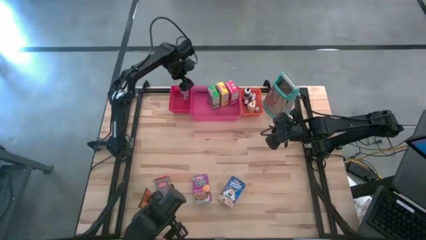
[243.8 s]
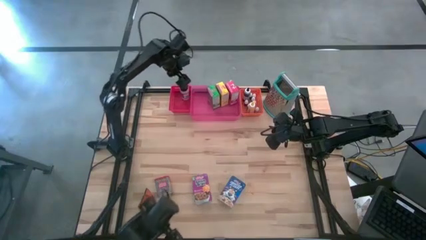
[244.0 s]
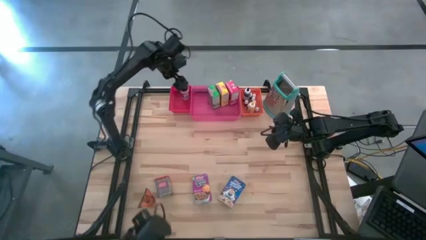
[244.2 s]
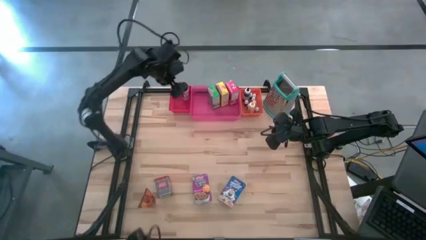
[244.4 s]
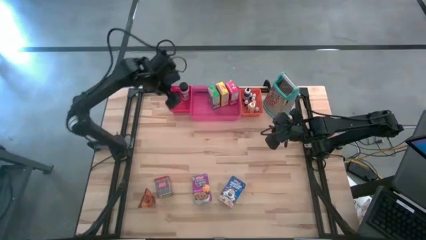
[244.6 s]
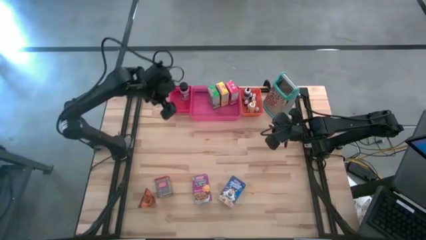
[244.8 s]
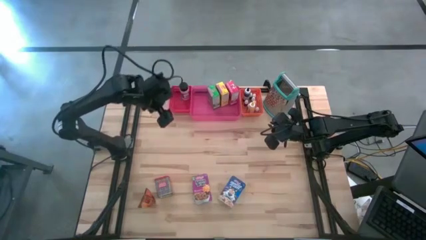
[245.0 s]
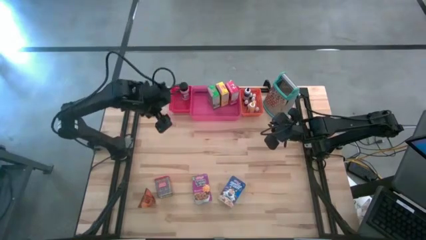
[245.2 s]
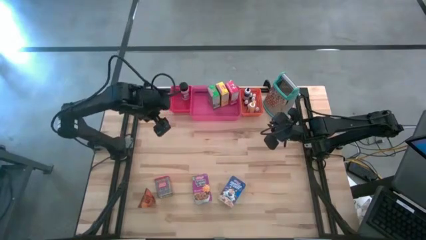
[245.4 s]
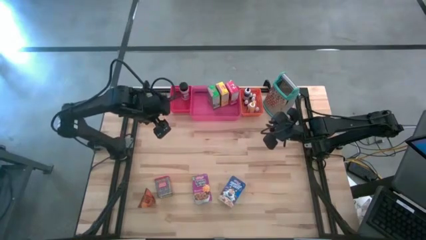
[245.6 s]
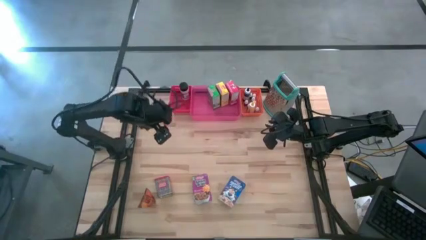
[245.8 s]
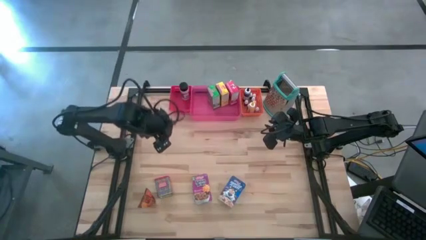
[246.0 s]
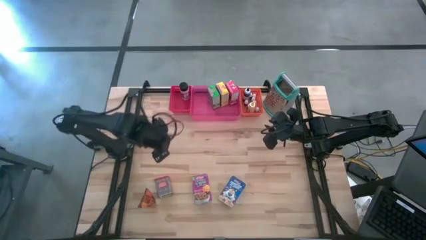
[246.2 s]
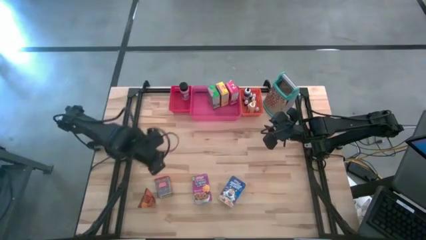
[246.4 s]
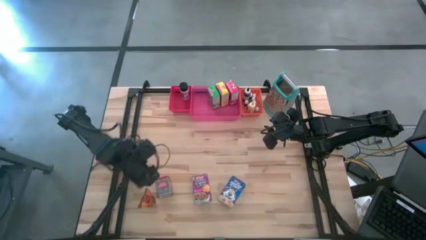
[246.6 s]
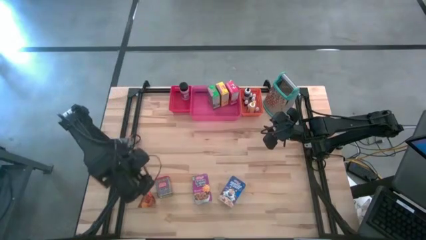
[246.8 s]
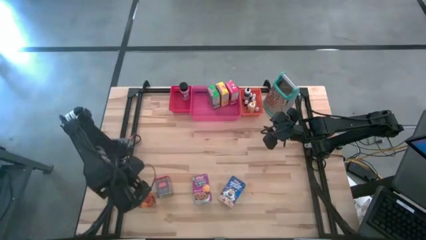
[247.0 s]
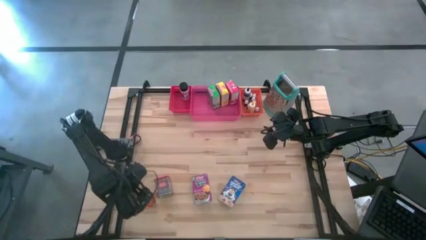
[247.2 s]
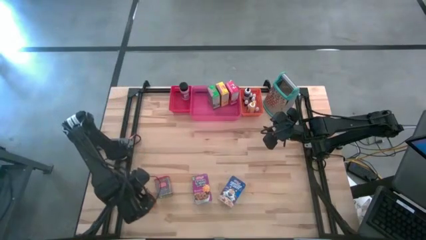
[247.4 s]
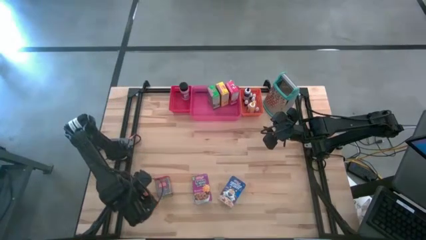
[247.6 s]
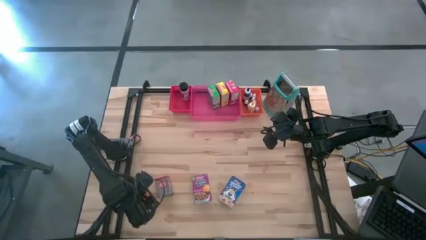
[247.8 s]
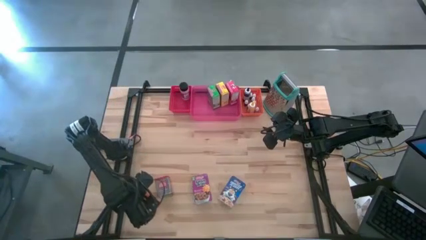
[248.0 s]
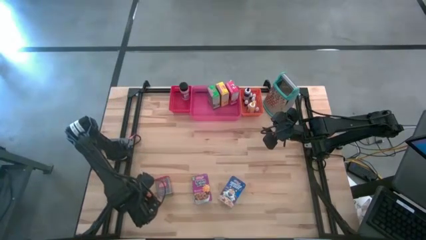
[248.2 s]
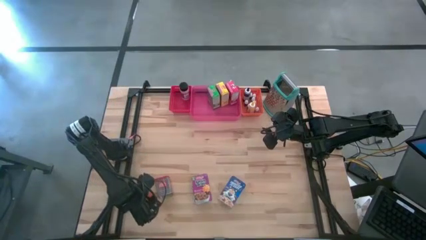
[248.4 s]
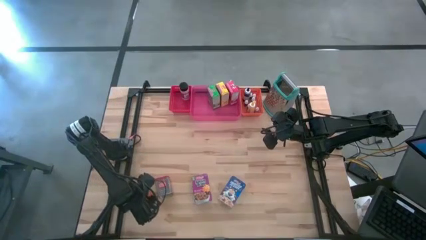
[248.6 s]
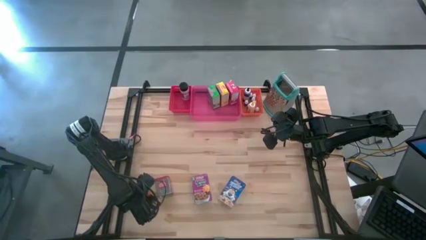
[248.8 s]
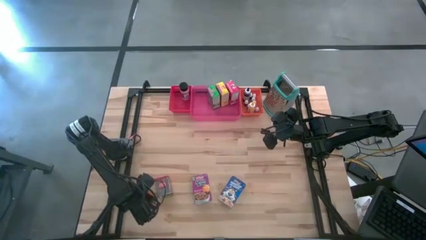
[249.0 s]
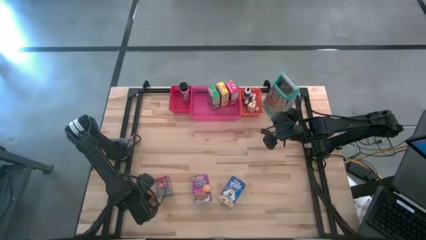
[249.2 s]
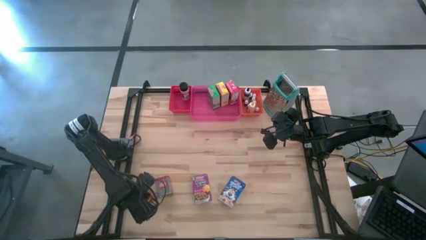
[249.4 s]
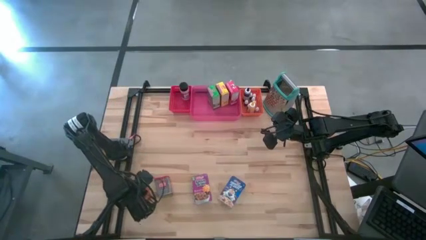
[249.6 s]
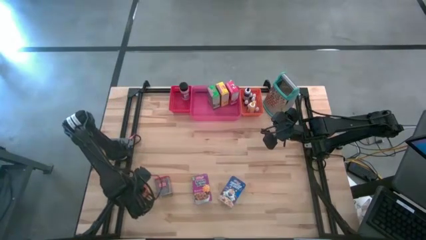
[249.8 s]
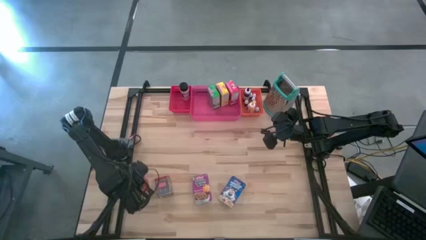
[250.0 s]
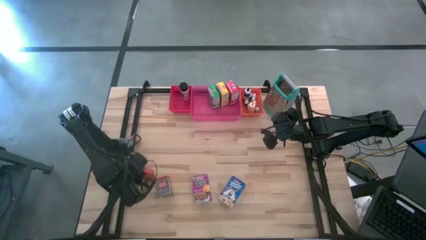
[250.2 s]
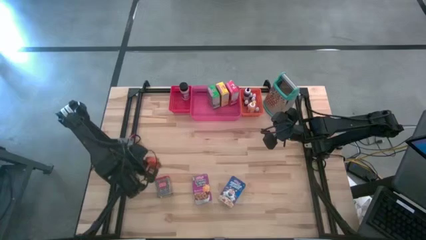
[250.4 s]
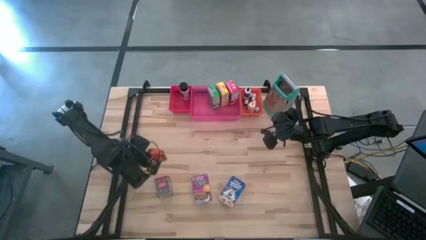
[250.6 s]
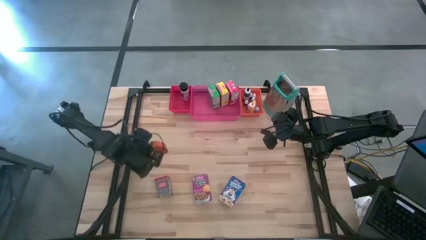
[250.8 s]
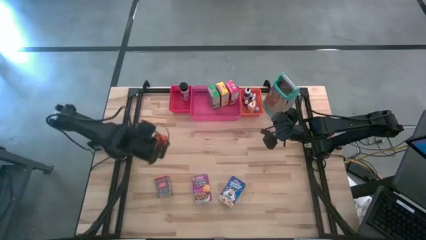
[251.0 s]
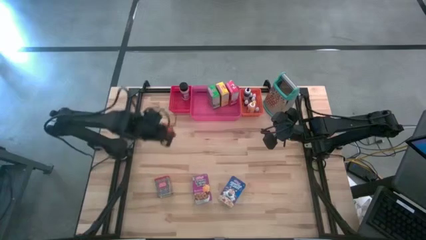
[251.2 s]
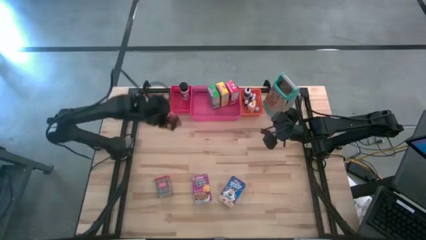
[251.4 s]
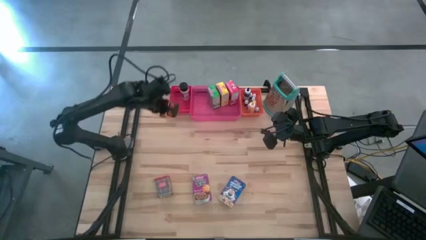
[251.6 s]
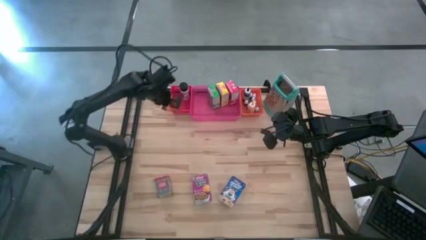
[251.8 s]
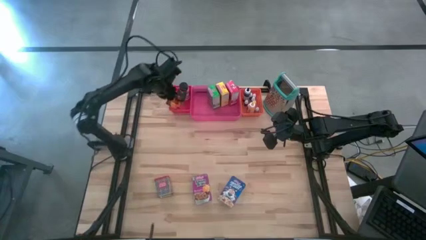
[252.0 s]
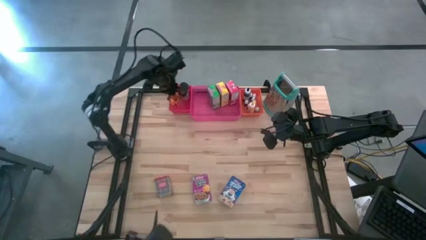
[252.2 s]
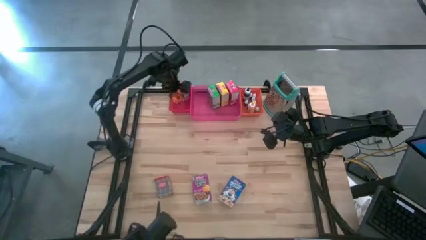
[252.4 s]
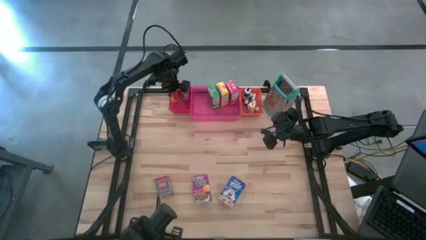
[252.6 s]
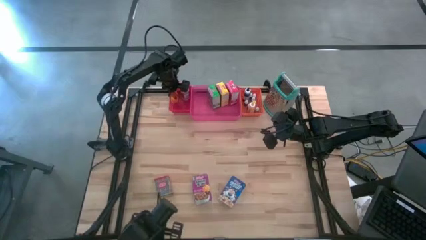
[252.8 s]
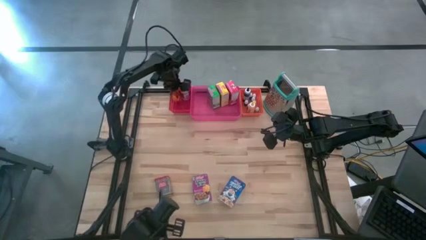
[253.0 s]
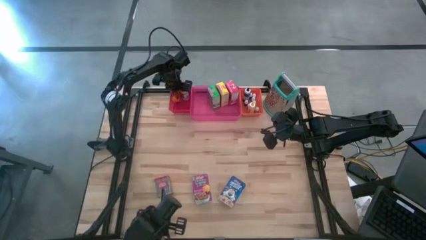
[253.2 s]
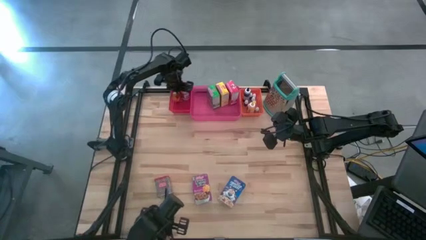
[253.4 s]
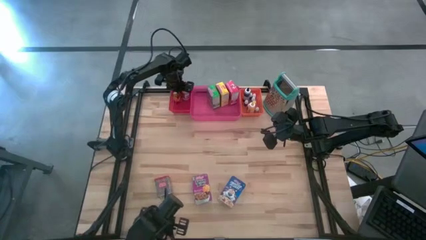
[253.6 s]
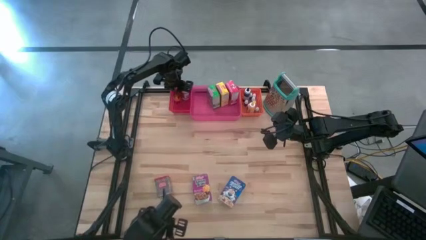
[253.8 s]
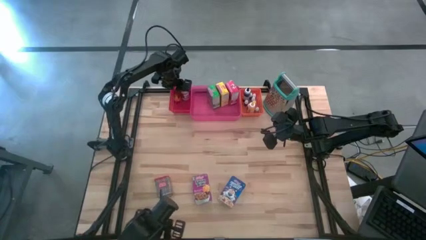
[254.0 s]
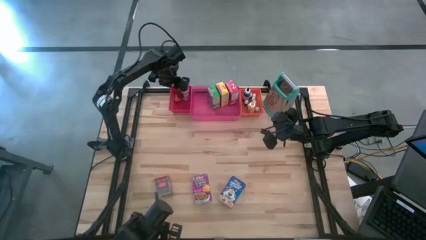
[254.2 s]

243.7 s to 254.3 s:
Task: Pick & Place Kitchen Items
Put the orange seasoning pack into red bin

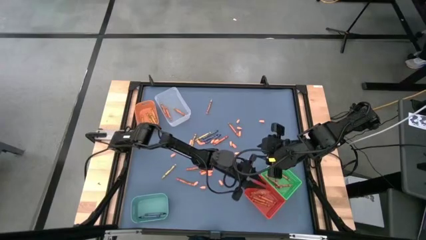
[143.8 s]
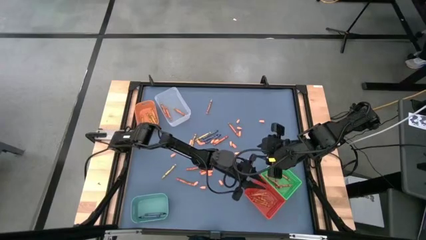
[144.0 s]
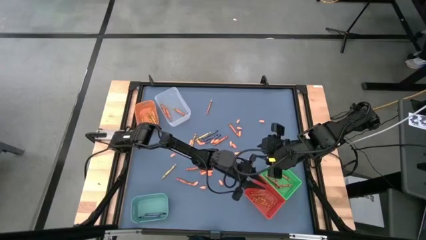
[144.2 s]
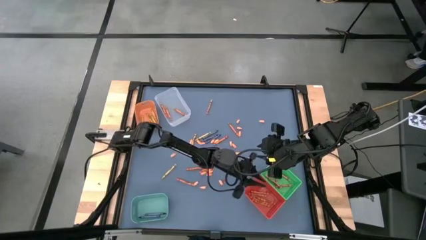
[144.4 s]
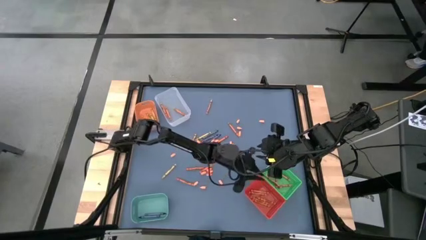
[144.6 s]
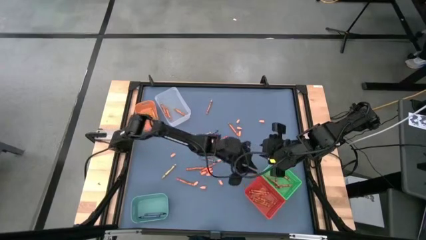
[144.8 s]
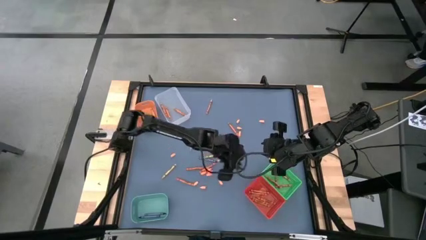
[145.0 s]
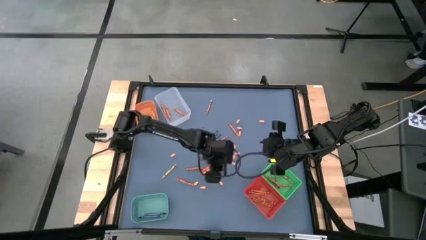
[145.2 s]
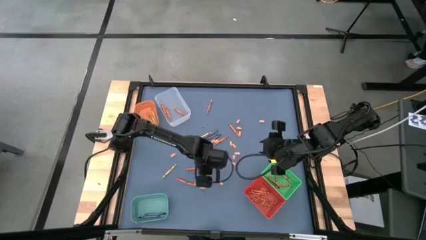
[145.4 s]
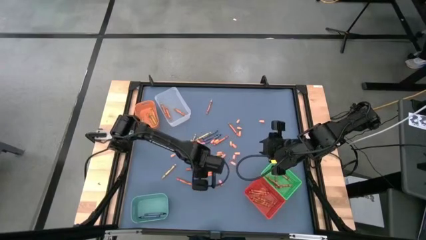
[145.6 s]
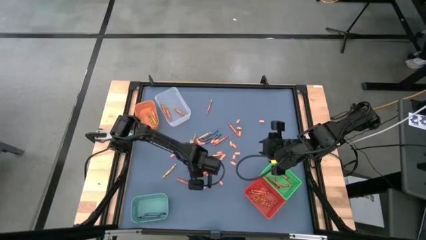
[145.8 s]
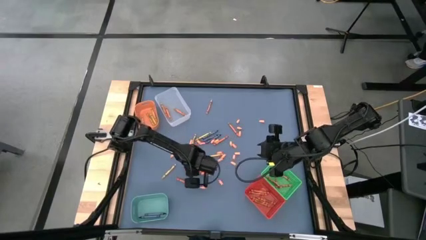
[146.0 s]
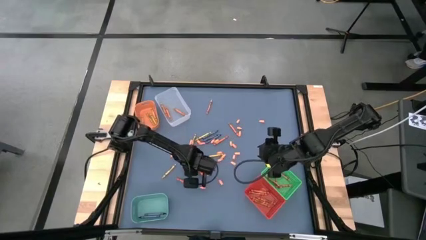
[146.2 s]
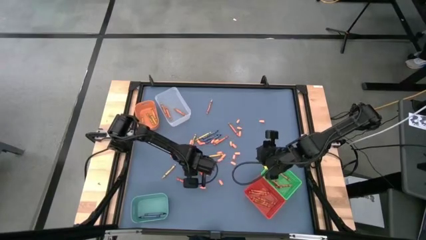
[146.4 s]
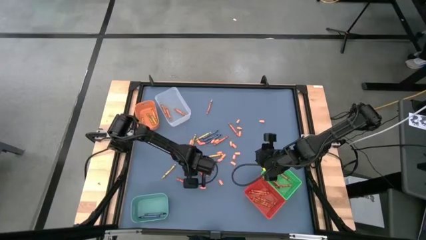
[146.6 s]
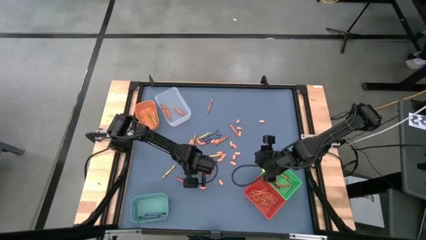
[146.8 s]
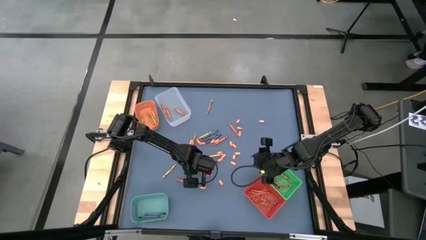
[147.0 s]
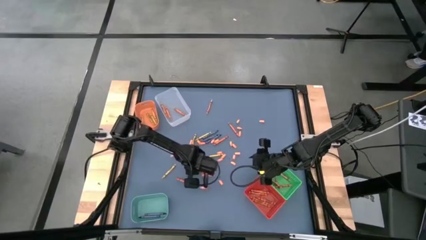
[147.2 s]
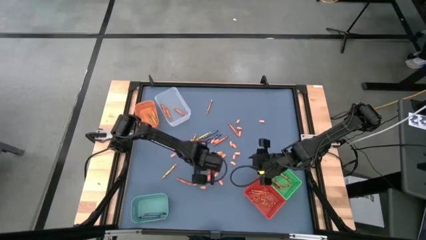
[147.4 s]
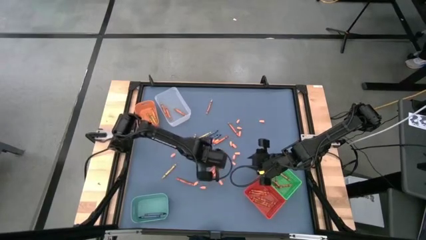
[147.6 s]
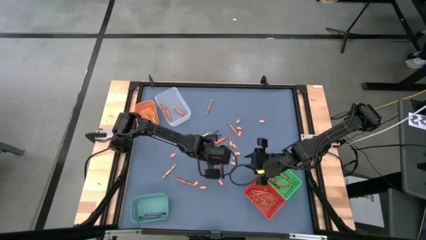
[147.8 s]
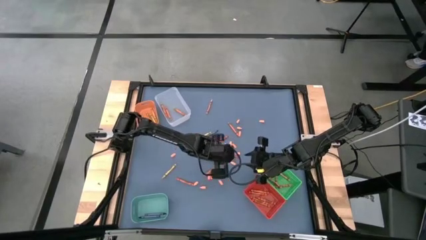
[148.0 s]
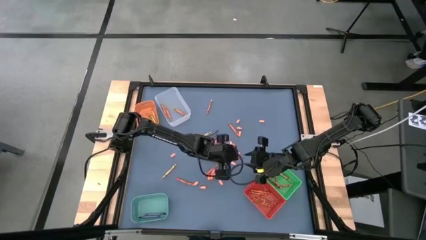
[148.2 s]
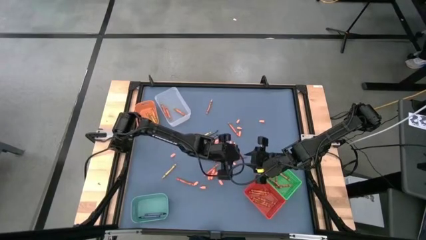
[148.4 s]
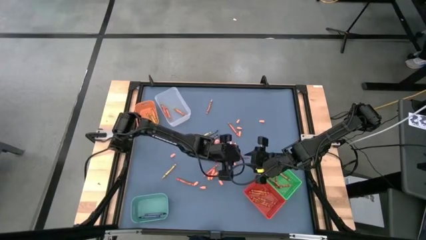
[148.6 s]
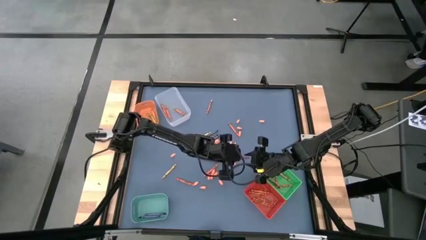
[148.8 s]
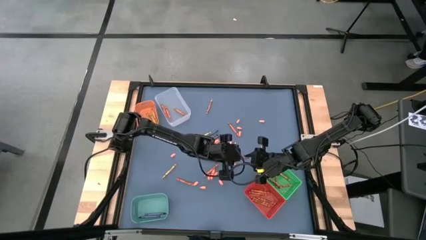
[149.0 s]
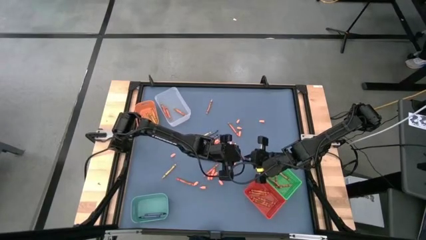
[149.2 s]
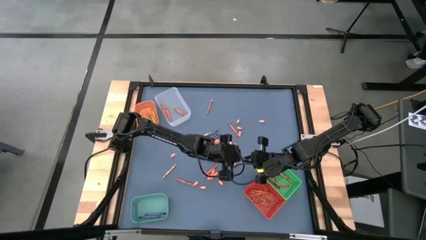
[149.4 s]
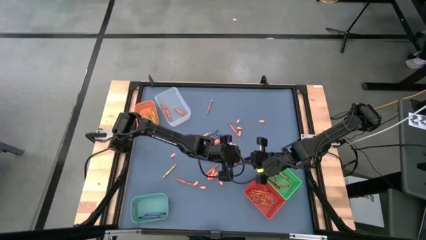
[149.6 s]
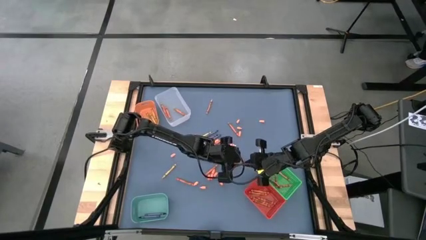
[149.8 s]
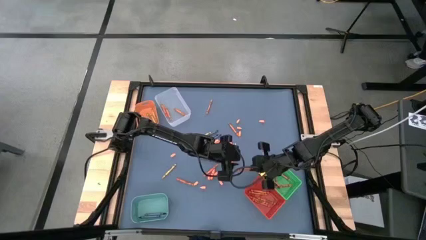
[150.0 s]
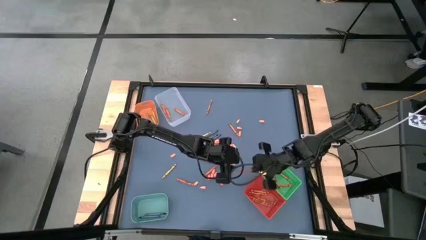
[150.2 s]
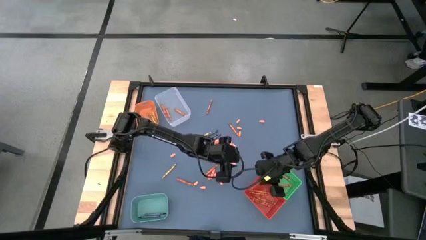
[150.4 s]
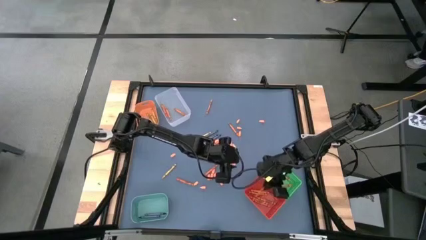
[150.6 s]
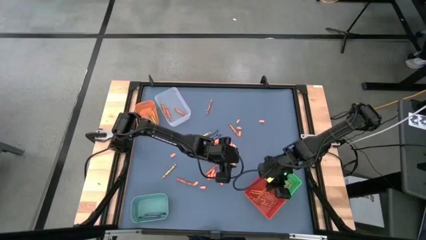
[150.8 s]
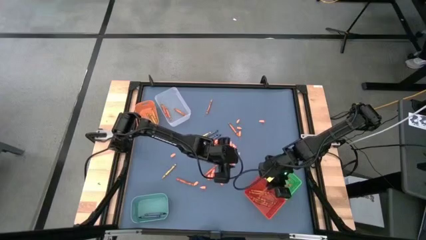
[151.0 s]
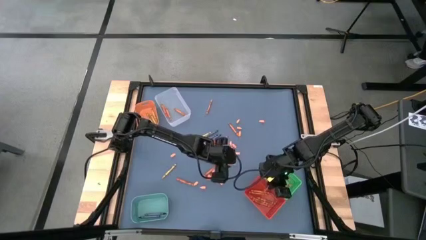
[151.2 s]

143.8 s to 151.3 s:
Task: Sort crayons
Put the red crayon into the red bin
